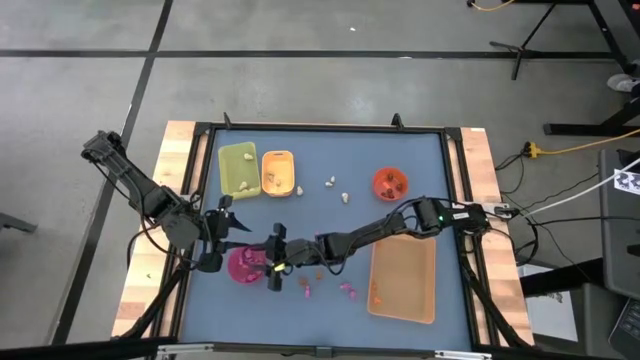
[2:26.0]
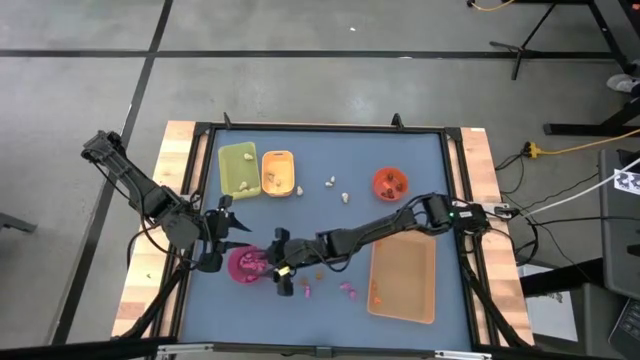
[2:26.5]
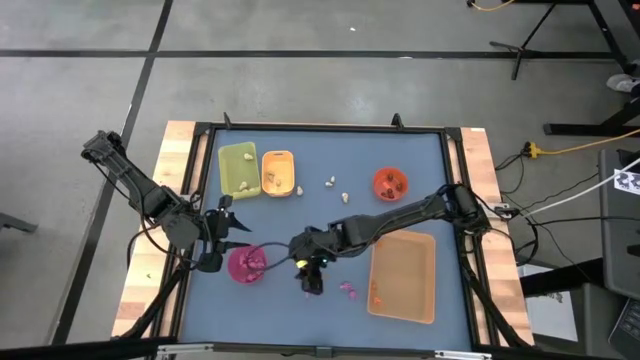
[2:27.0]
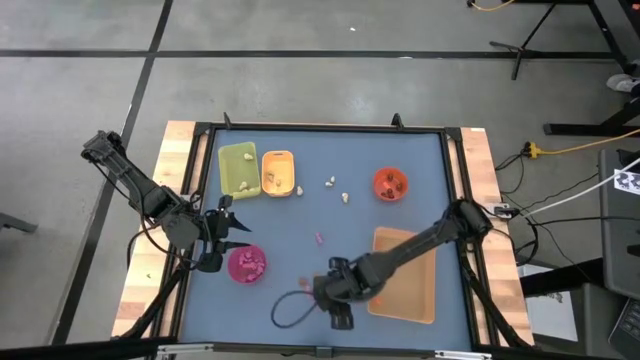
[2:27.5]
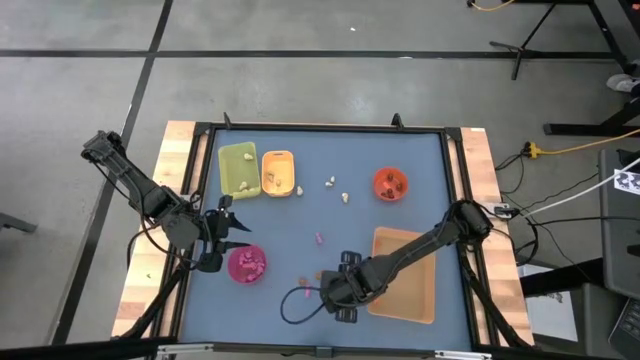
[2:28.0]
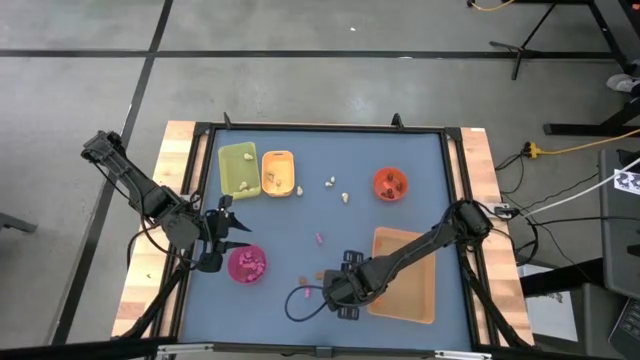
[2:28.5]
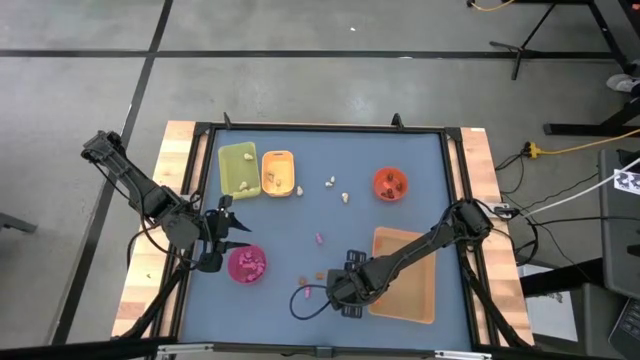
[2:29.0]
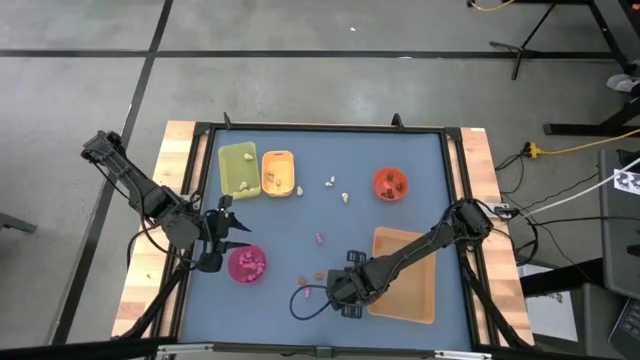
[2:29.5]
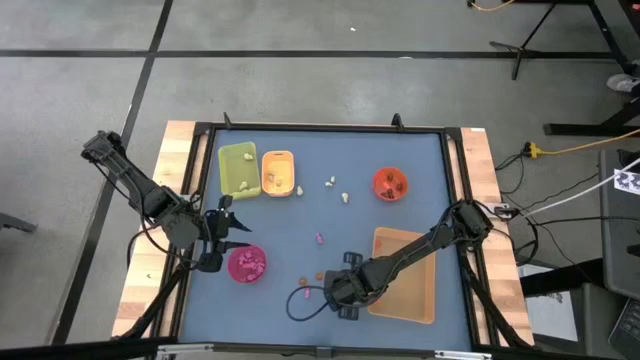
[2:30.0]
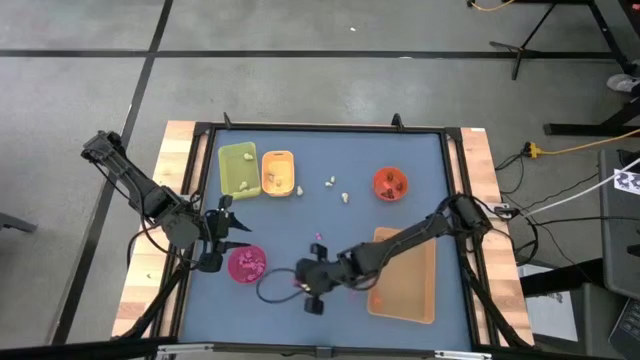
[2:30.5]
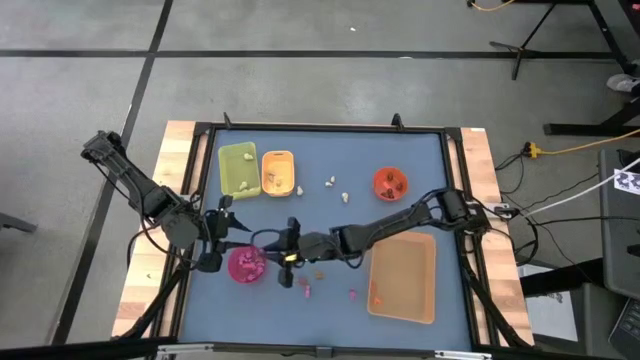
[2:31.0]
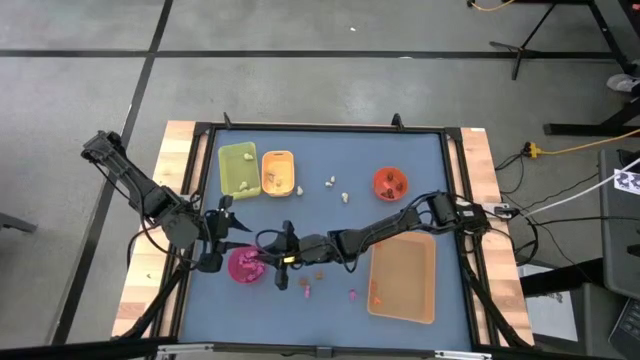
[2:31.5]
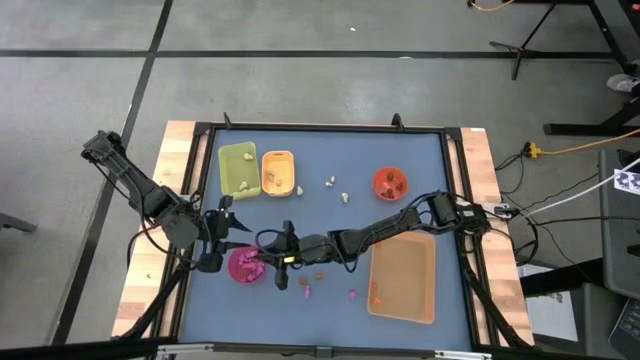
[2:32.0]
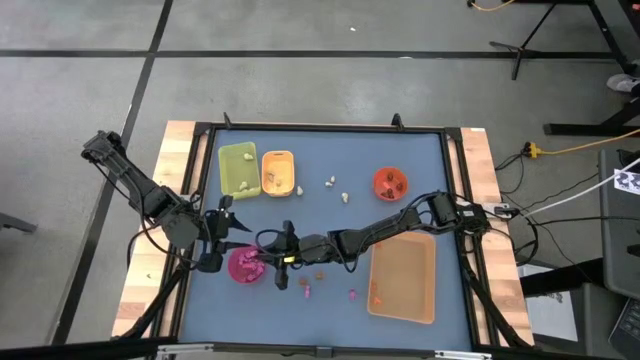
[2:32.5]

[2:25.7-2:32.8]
Task: Sort Halloween decoration
Put the pink skeleton toy into the red bowl

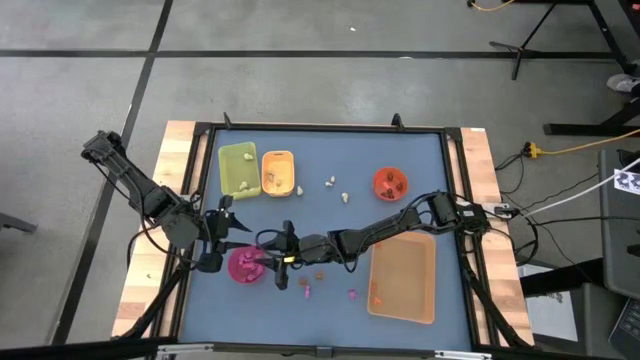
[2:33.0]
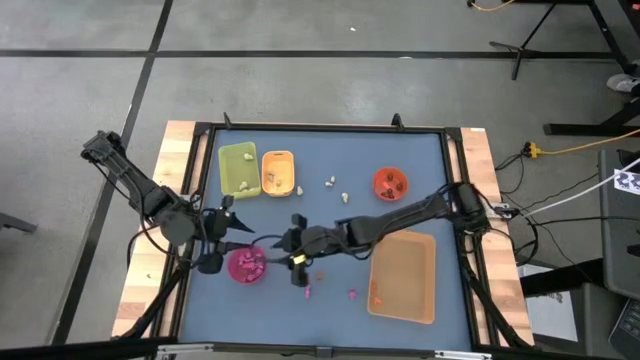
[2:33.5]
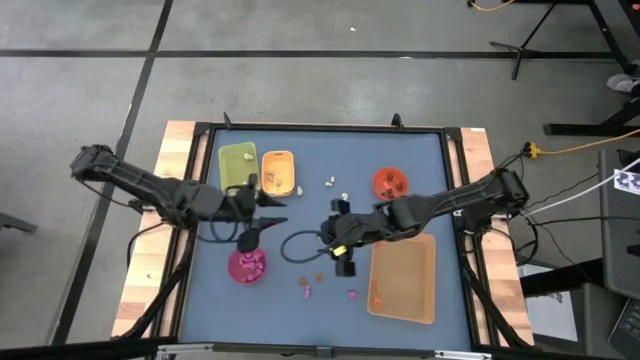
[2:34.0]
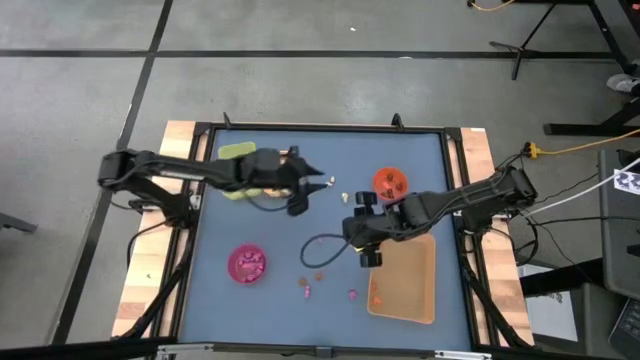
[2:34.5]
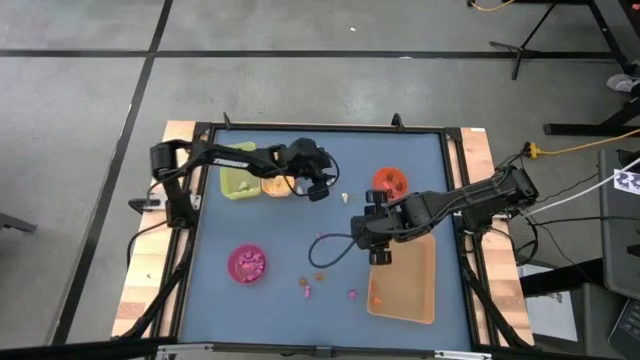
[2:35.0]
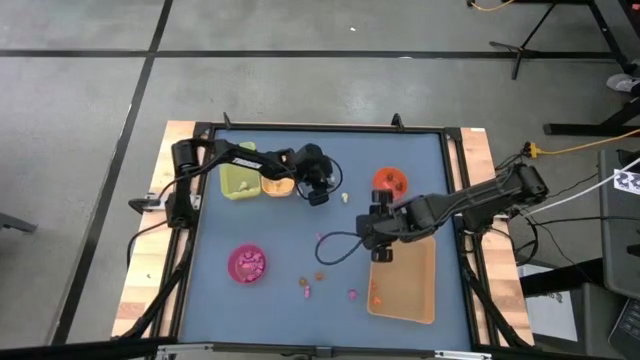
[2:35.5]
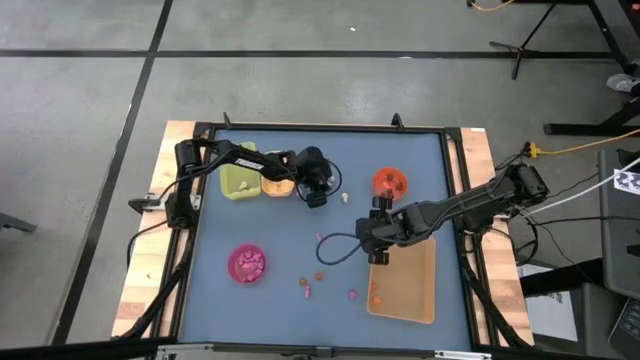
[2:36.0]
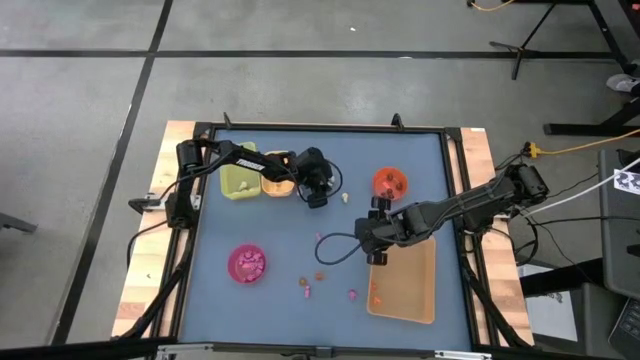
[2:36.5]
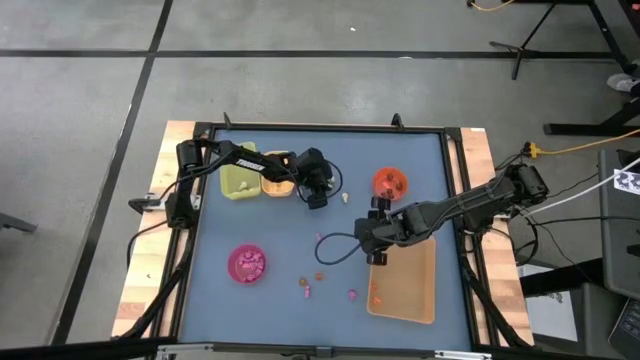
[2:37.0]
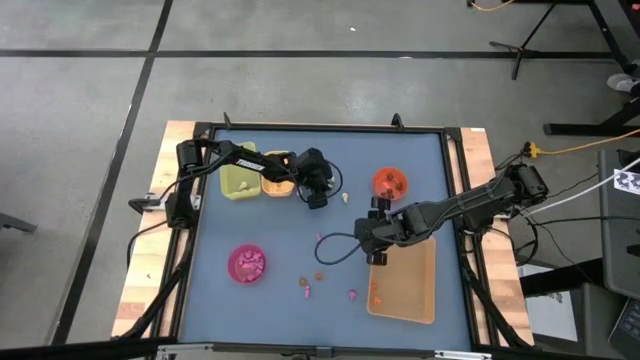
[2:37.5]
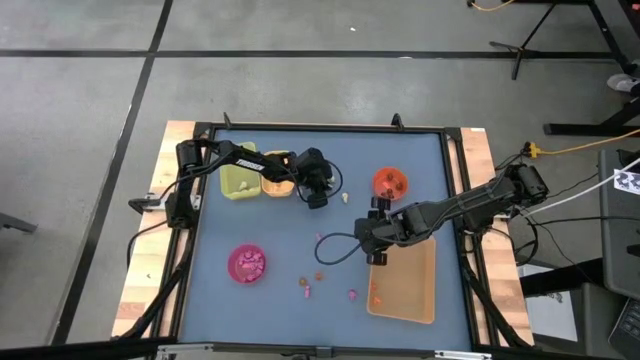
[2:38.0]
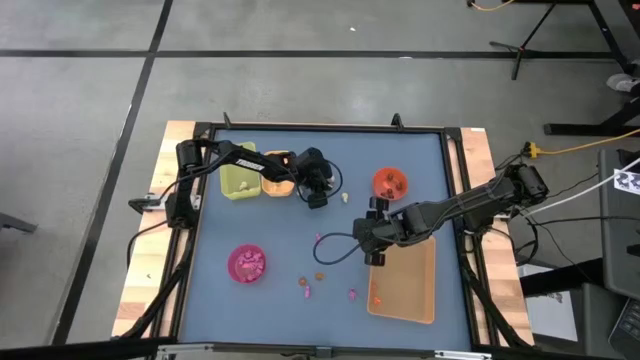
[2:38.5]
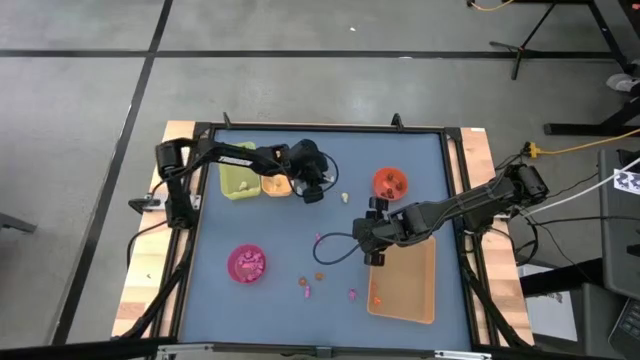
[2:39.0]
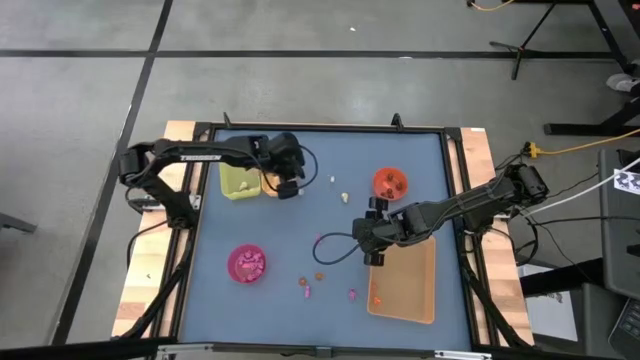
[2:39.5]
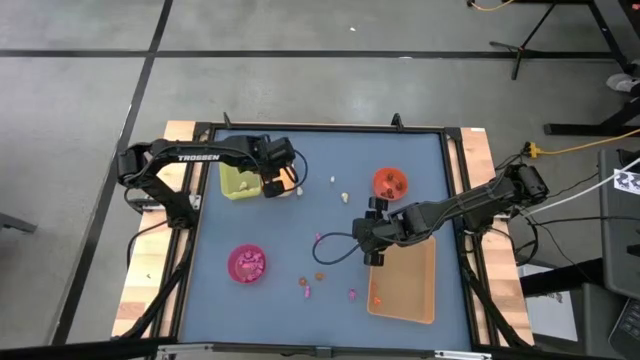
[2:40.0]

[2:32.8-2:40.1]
Put the small white skull toy into the yellow bin

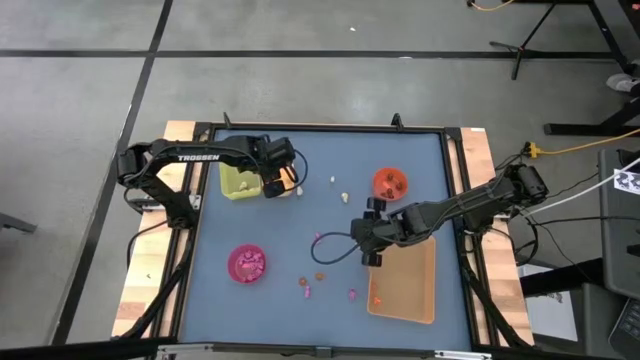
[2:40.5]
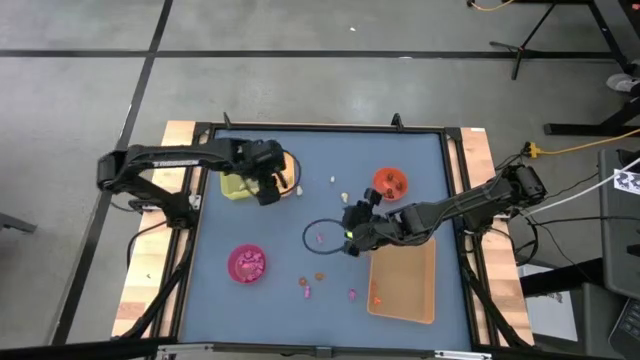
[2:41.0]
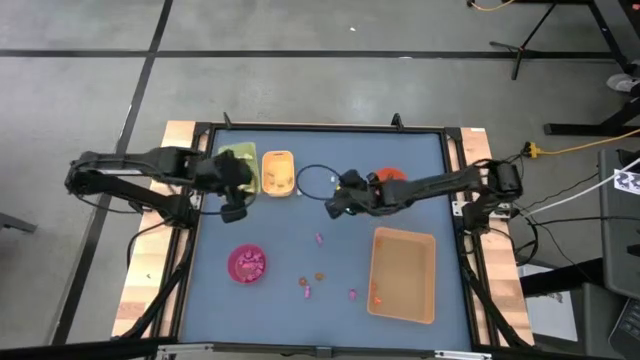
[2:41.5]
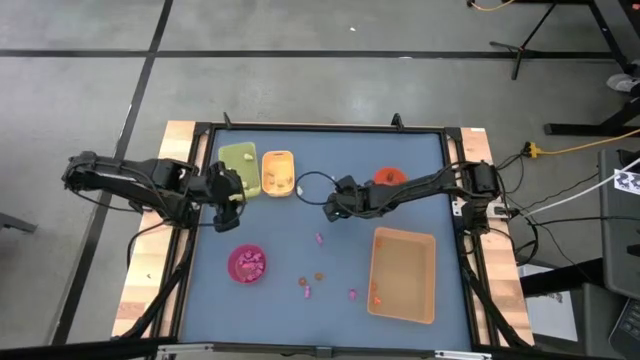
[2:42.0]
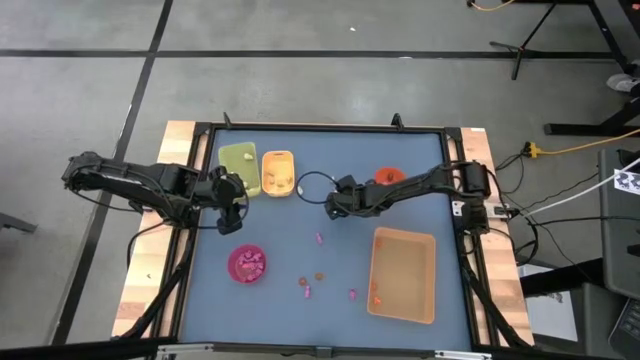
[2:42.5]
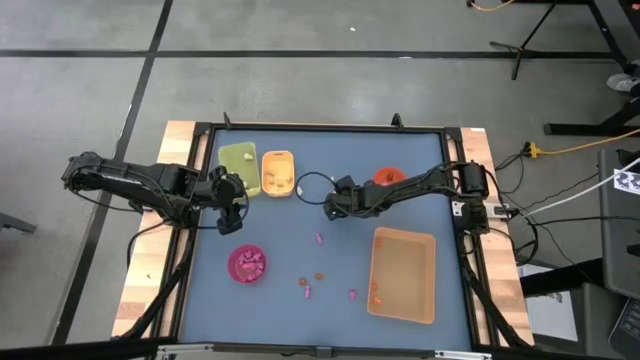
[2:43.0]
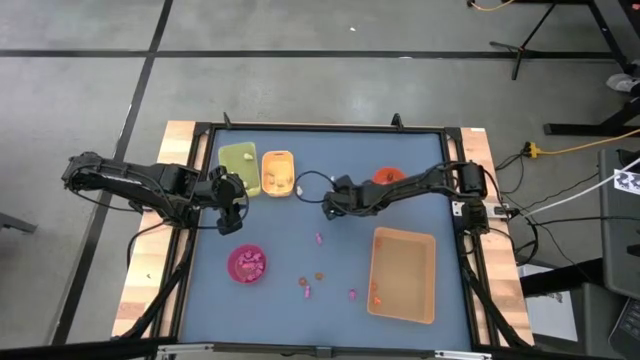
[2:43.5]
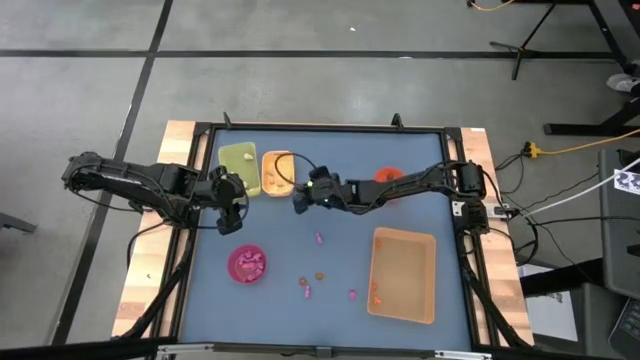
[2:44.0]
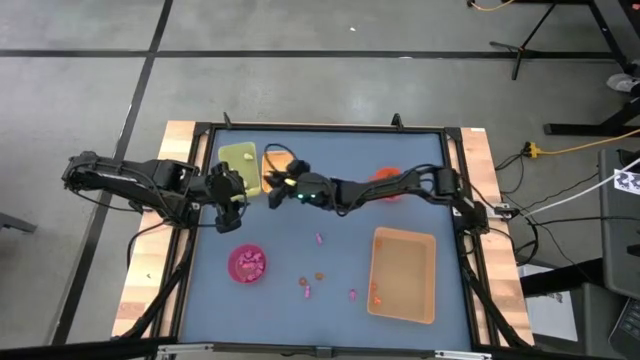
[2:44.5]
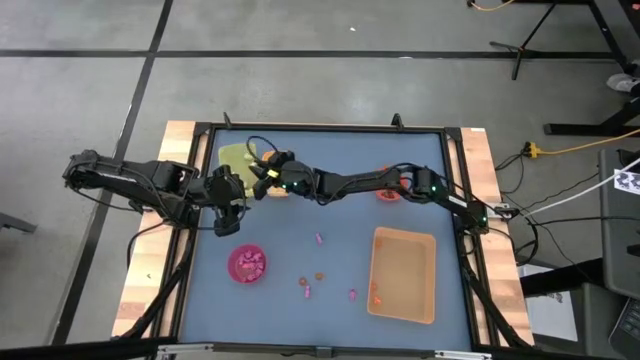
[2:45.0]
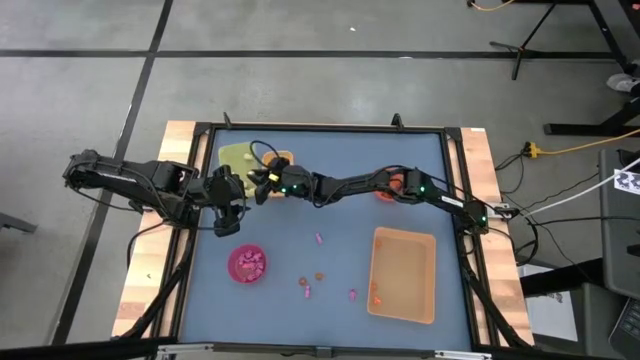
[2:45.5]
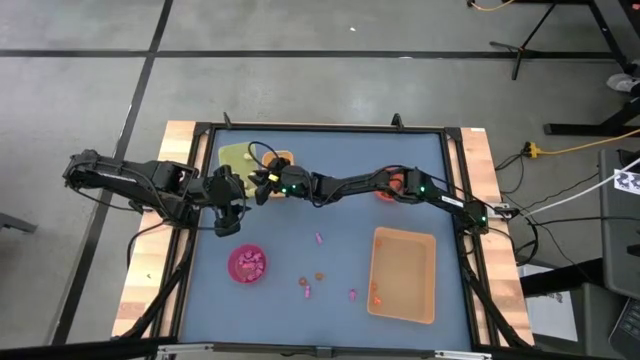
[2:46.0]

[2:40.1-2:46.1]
Put the white skull toy into the yellow bin
